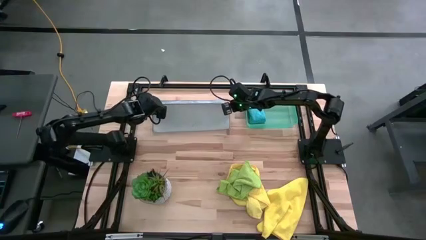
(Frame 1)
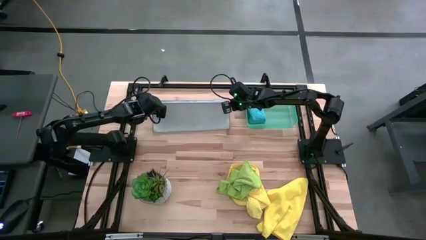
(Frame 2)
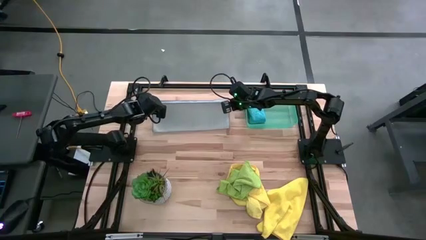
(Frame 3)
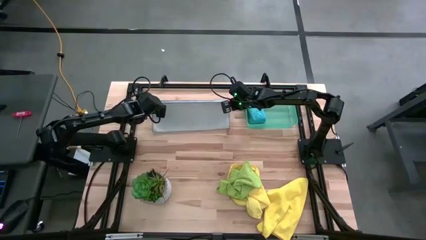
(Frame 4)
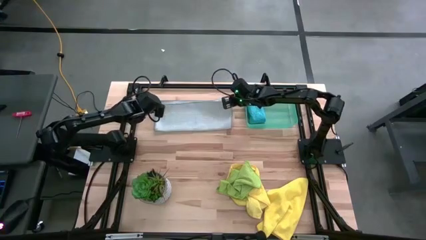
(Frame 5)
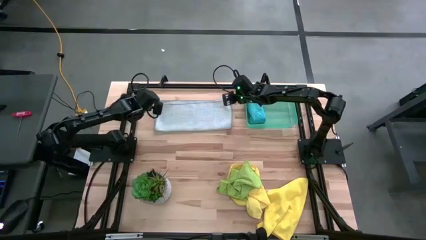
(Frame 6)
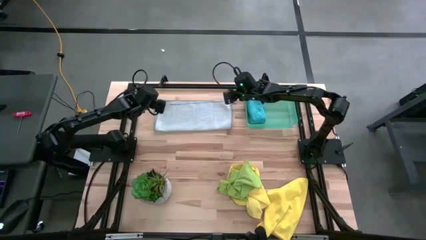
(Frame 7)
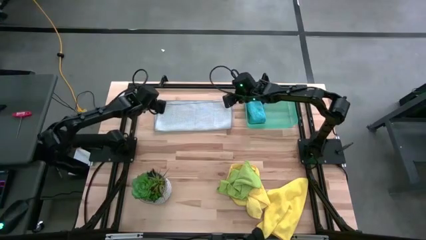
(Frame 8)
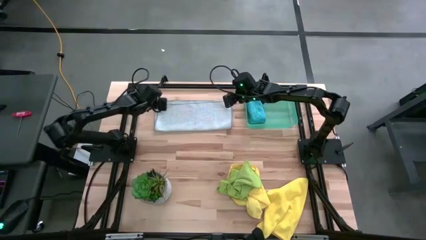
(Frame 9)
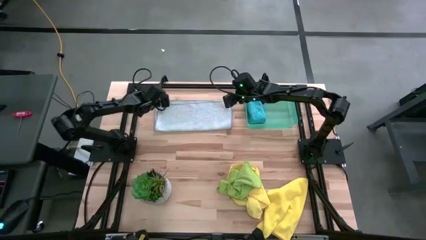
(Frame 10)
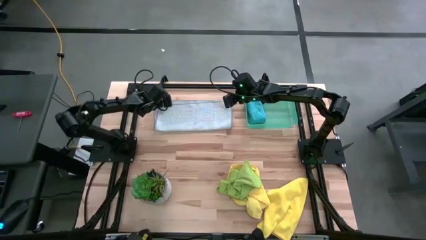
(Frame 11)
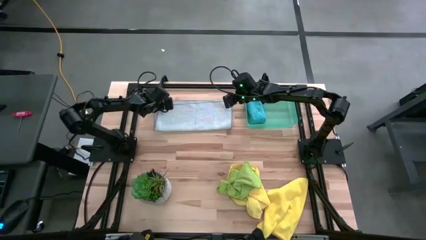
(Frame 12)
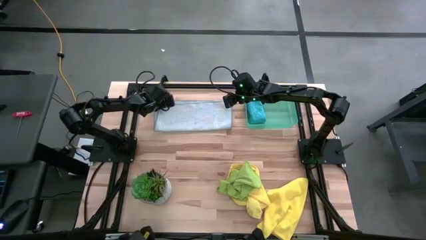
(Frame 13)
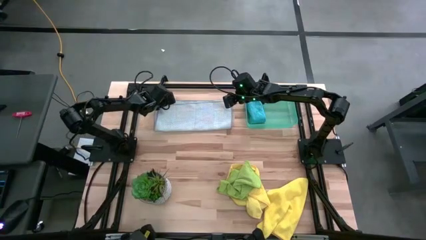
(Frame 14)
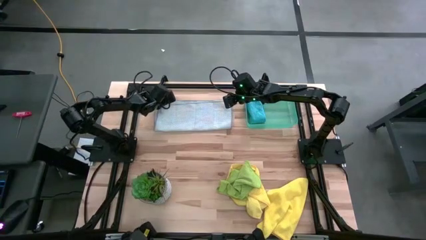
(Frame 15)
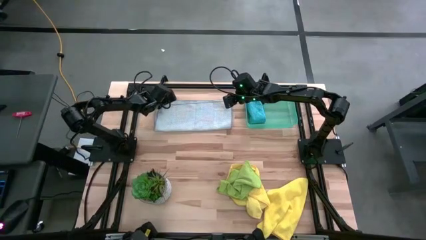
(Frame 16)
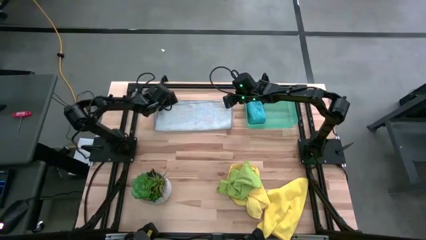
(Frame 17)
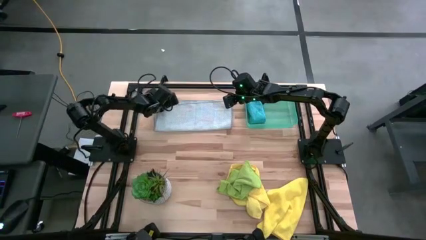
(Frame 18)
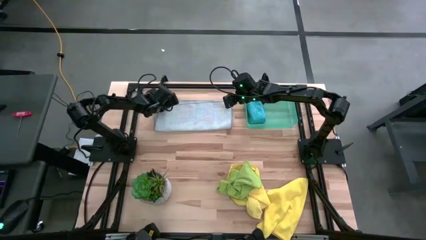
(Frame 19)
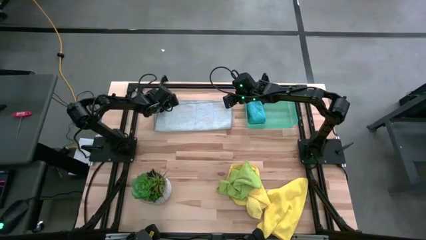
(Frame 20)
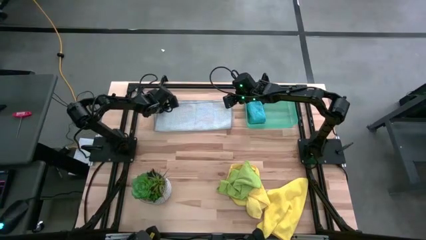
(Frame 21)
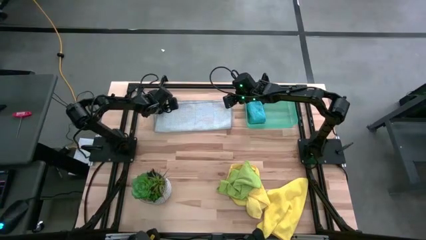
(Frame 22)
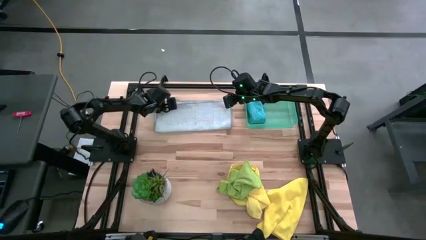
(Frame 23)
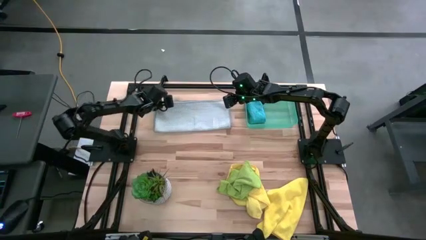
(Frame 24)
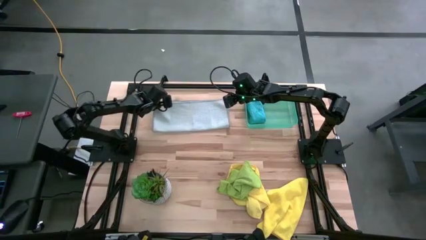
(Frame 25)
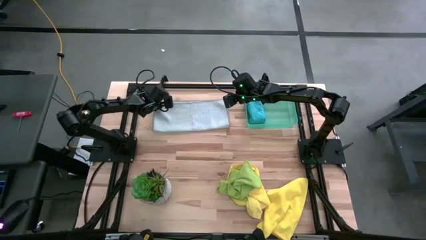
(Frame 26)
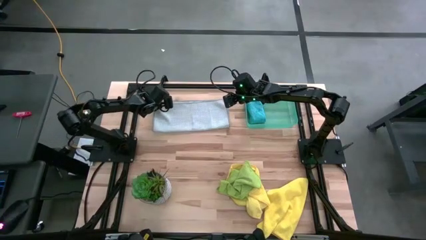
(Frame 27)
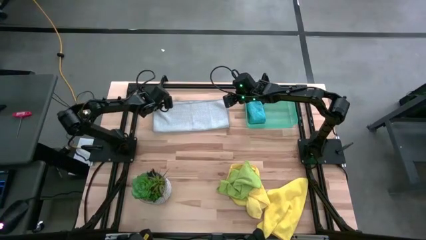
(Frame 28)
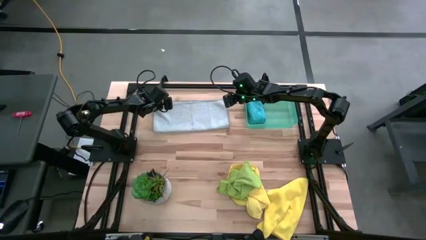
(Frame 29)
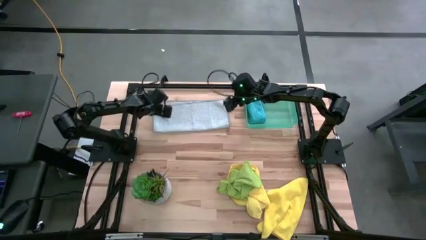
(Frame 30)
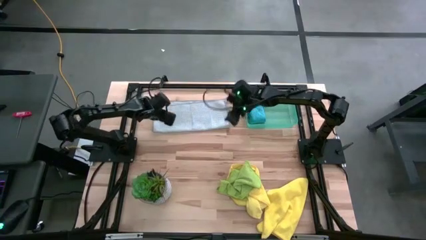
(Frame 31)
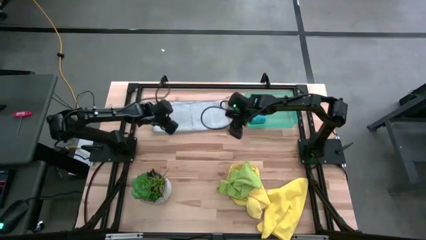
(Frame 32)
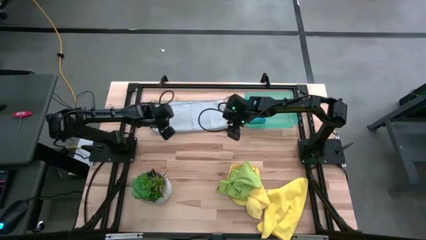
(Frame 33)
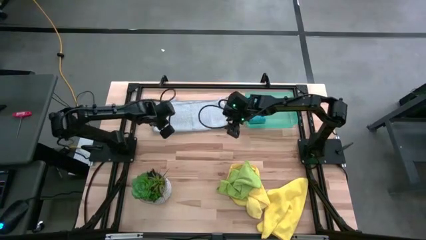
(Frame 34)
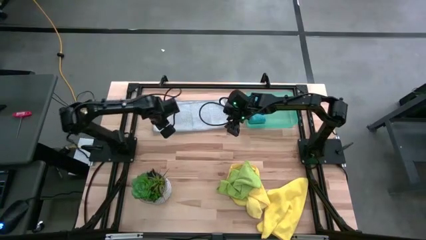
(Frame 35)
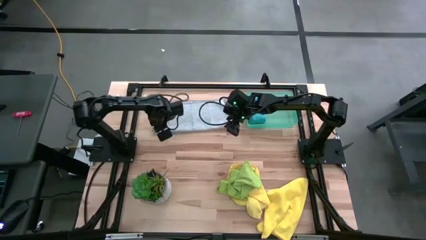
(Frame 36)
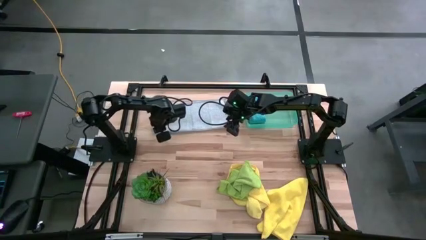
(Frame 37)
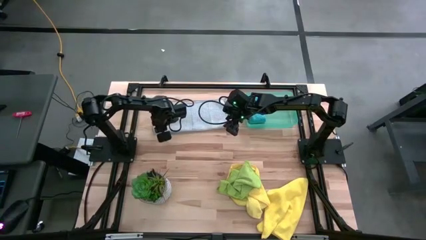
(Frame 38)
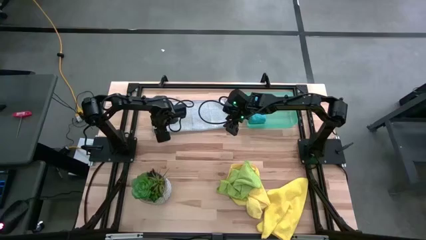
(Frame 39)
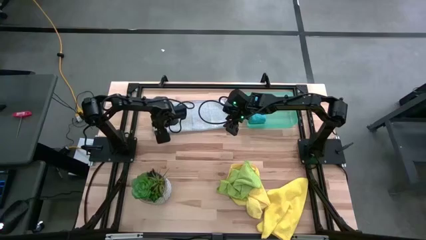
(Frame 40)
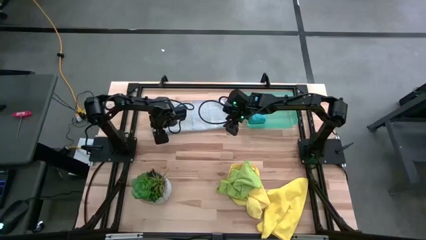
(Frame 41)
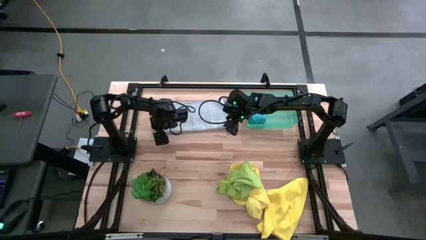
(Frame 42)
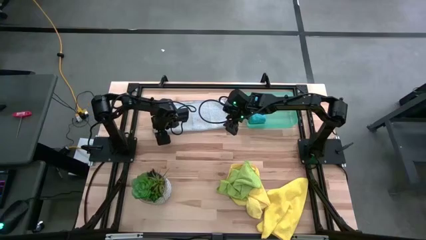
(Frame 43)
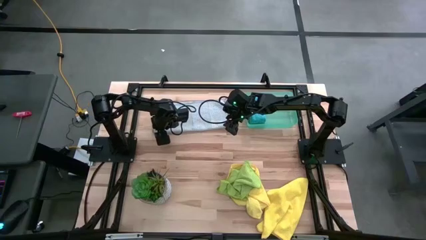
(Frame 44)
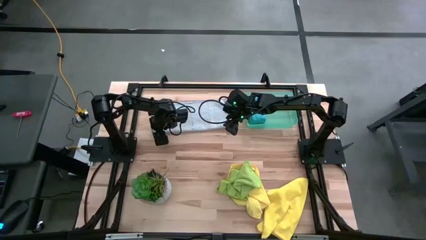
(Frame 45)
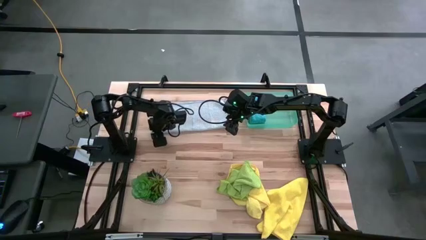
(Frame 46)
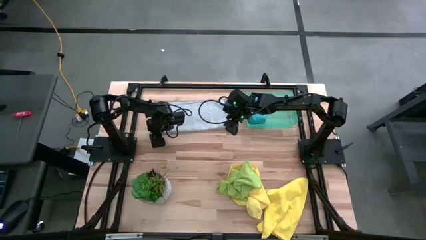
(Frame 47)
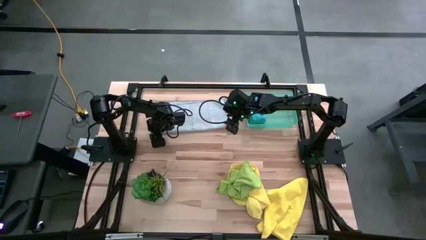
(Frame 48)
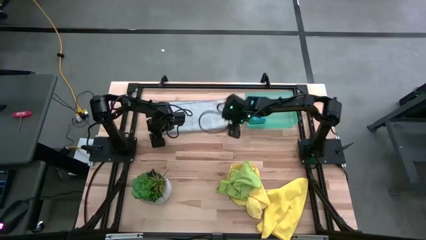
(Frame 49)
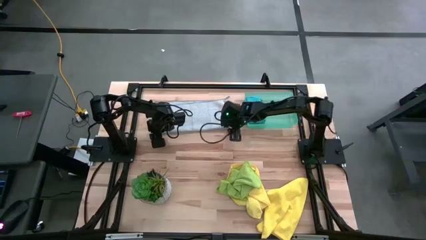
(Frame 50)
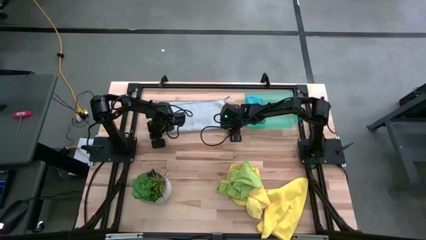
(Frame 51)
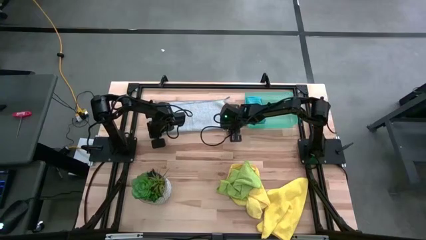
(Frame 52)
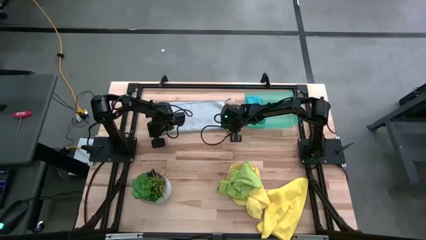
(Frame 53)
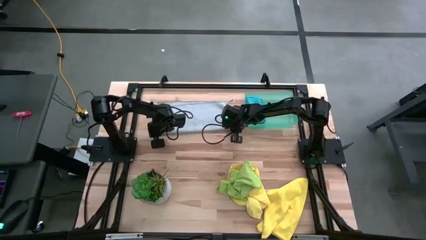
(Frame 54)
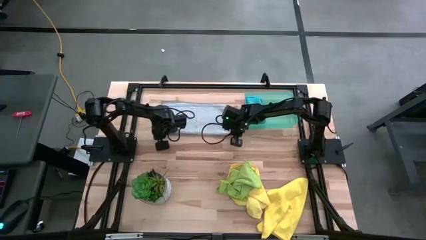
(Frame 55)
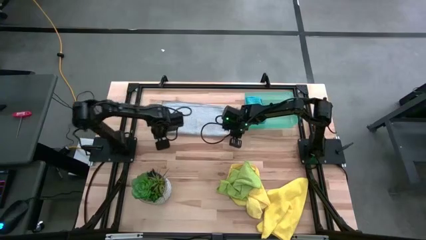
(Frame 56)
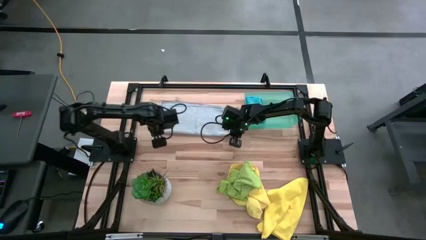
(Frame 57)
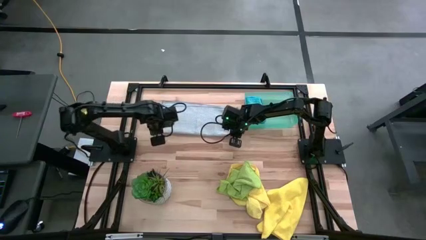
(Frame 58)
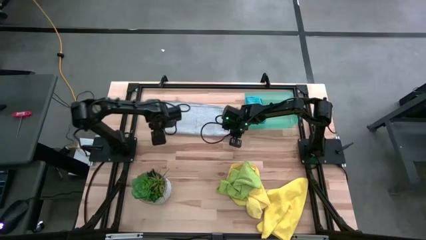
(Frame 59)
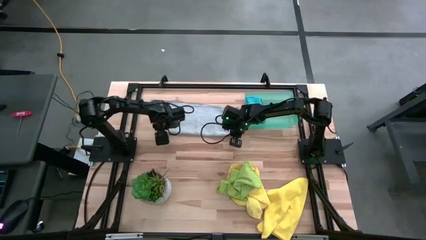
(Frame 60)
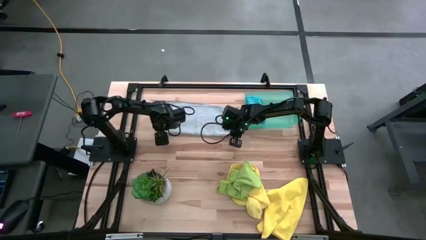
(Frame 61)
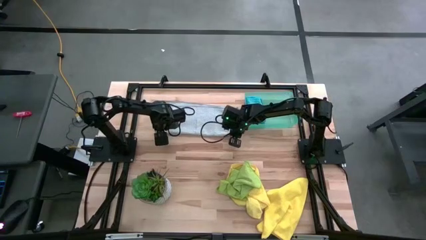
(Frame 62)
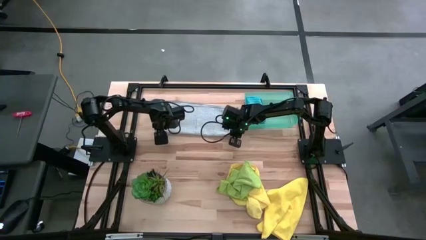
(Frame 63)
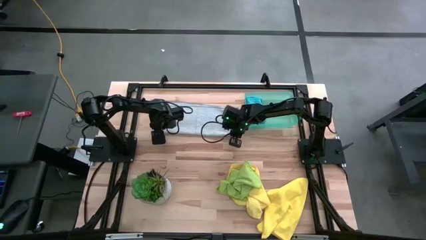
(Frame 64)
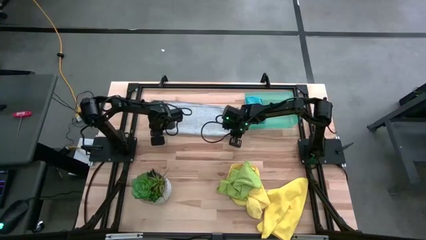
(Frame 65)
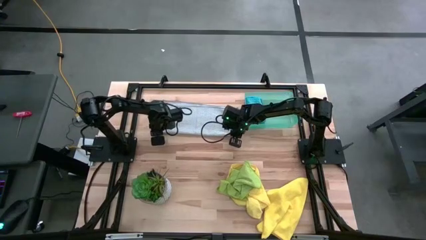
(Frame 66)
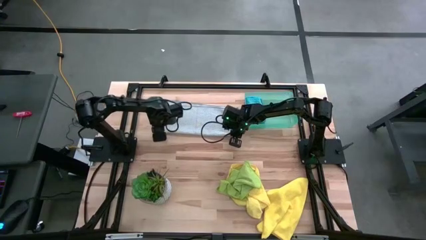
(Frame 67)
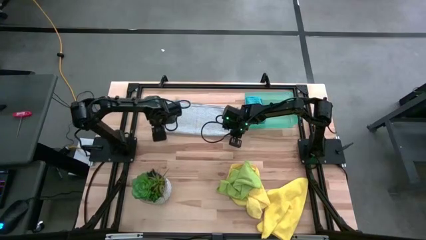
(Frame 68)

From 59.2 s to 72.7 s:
Task: Fold microfiber towels
Fold the gray towel

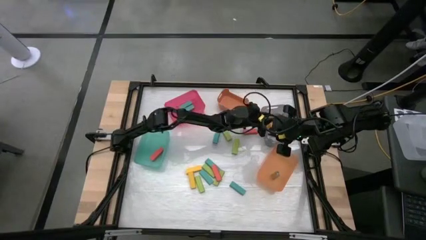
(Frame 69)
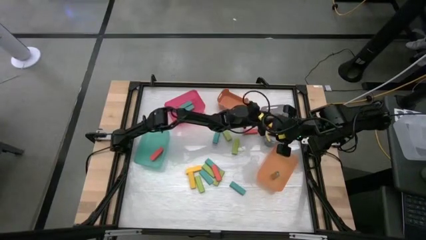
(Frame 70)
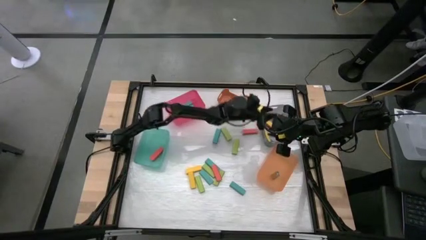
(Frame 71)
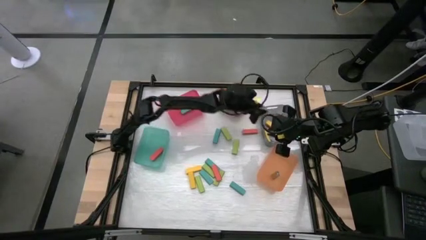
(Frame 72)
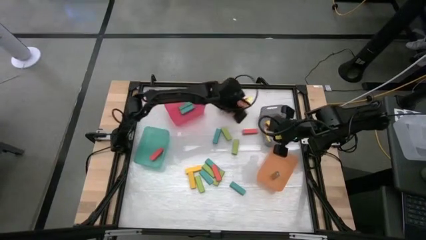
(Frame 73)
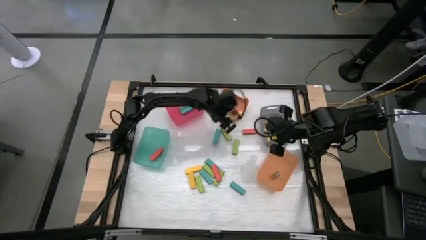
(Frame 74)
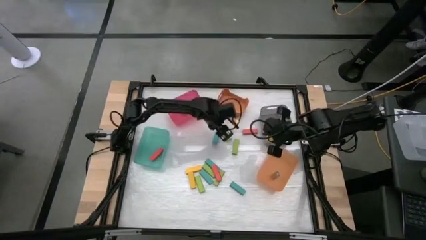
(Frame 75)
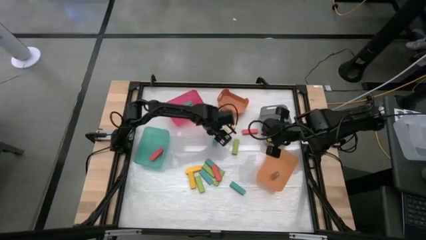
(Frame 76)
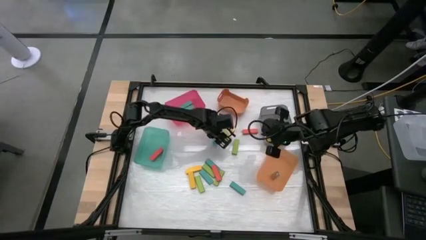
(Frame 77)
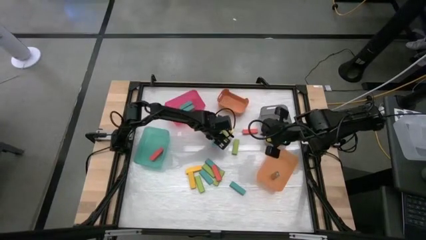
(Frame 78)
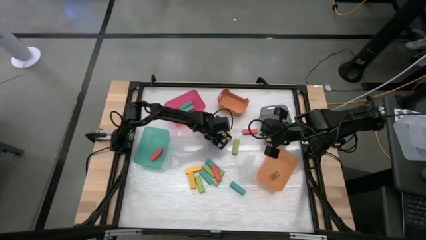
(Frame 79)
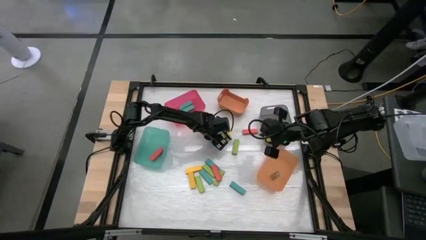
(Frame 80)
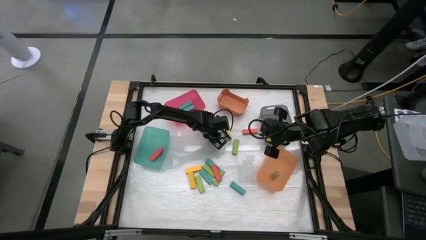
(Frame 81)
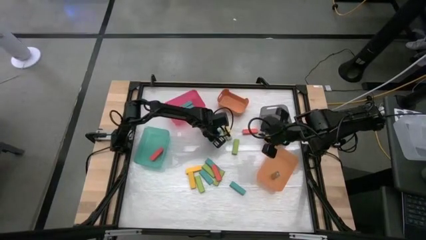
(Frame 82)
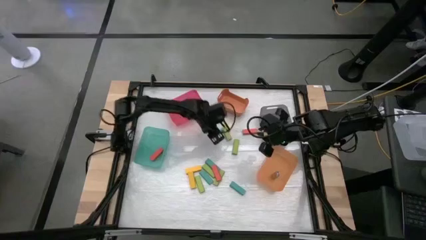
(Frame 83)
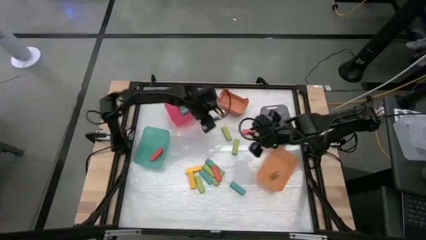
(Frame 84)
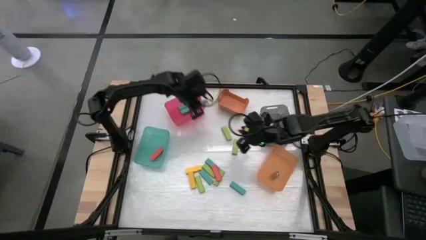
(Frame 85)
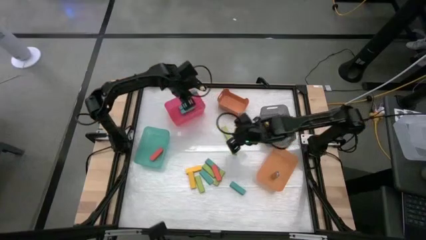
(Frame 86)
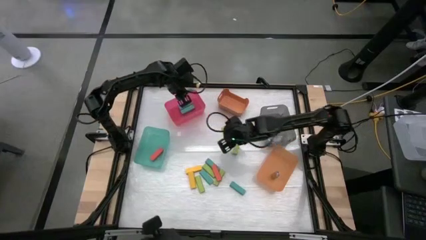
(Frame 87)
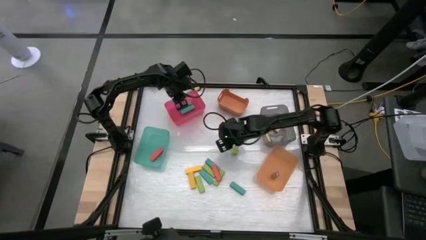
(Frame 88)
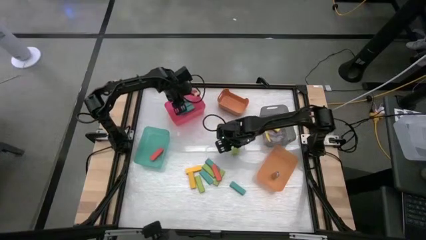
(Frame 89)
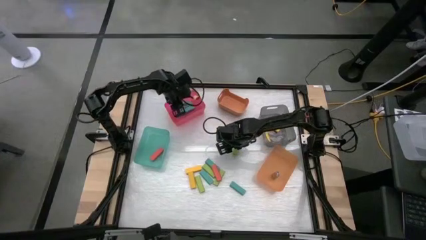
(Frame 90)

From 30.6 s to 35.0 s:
Task: Sort blocks
Put the blue block into the pink bin
